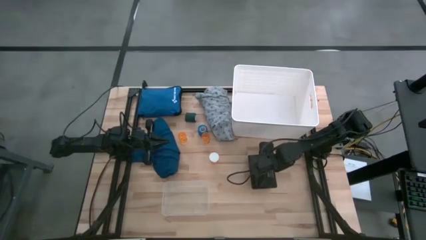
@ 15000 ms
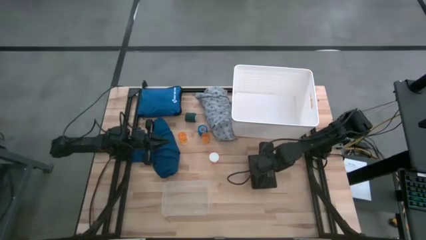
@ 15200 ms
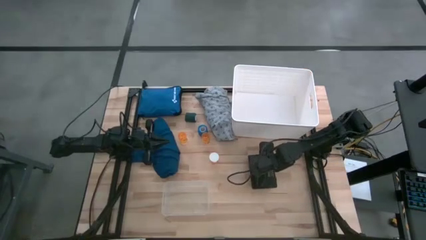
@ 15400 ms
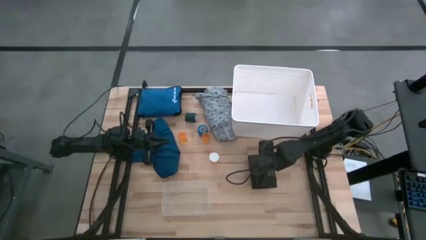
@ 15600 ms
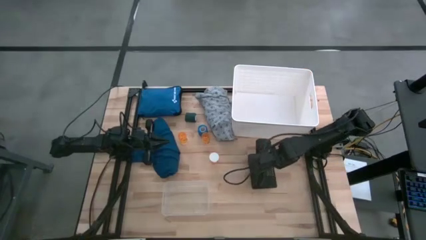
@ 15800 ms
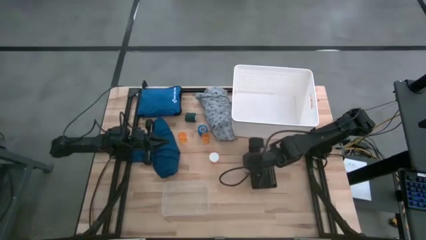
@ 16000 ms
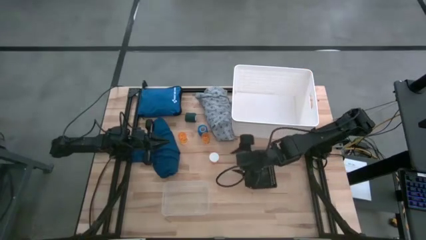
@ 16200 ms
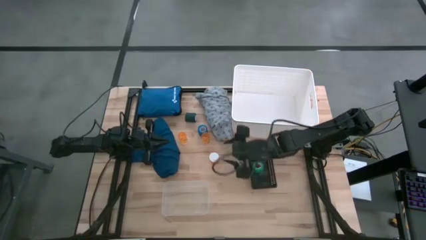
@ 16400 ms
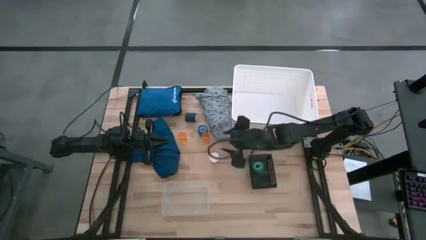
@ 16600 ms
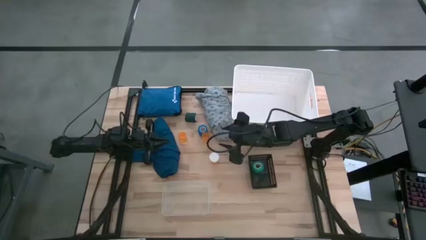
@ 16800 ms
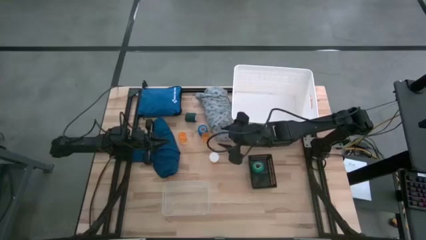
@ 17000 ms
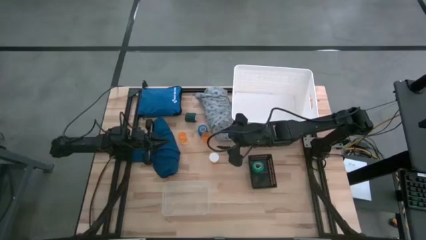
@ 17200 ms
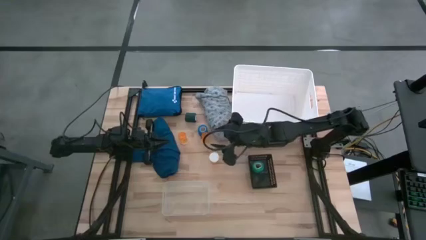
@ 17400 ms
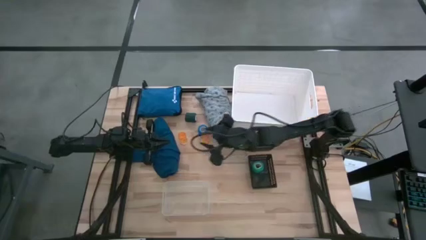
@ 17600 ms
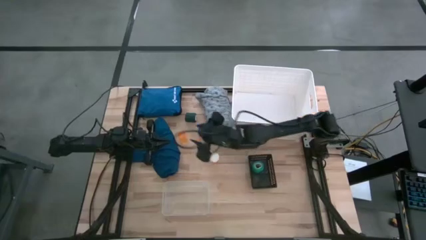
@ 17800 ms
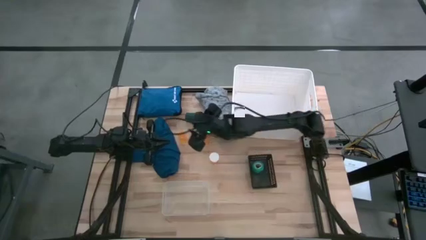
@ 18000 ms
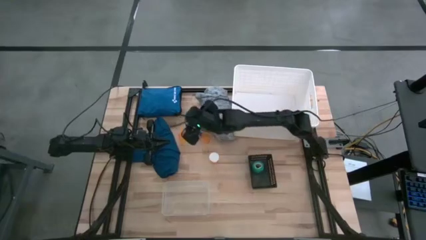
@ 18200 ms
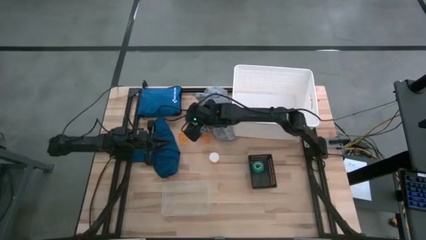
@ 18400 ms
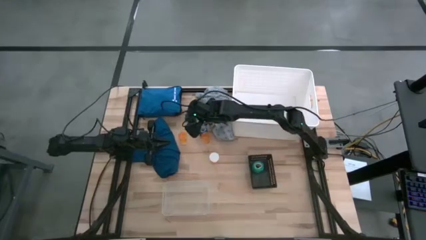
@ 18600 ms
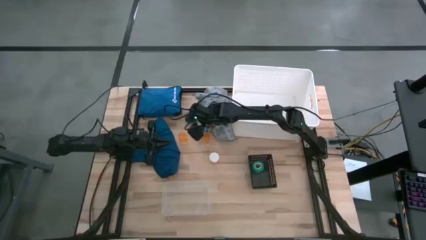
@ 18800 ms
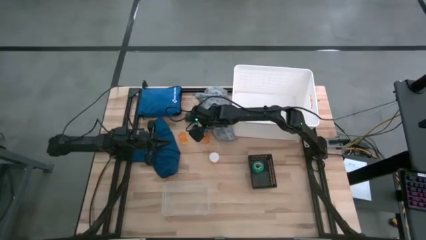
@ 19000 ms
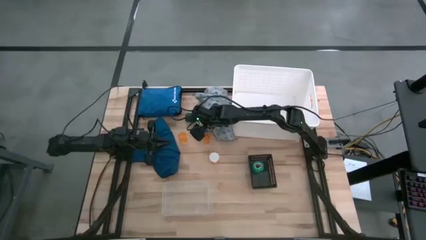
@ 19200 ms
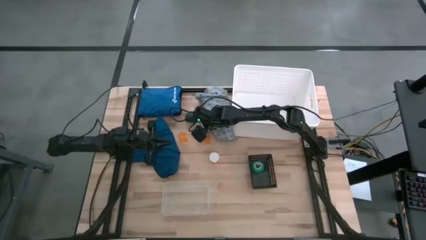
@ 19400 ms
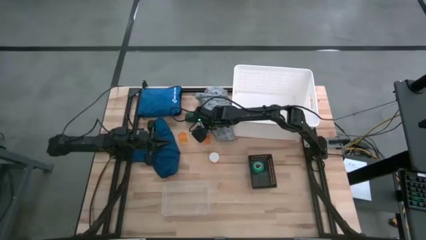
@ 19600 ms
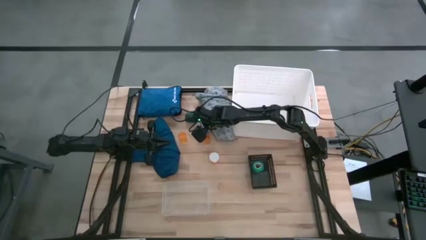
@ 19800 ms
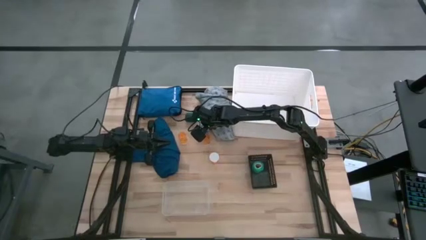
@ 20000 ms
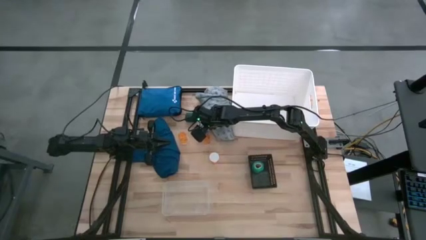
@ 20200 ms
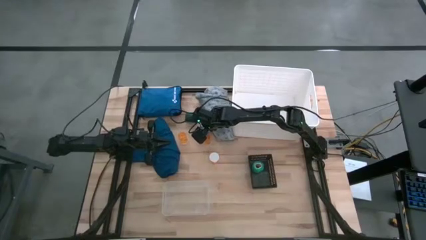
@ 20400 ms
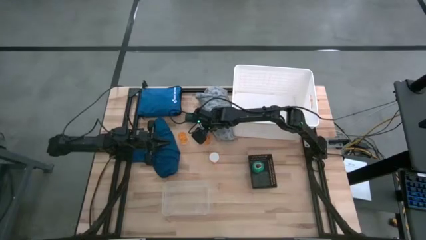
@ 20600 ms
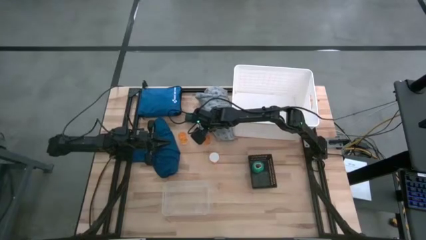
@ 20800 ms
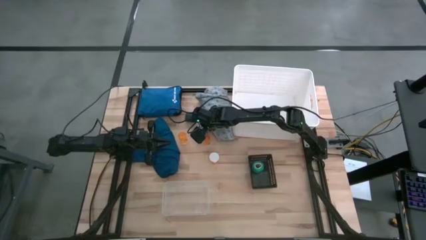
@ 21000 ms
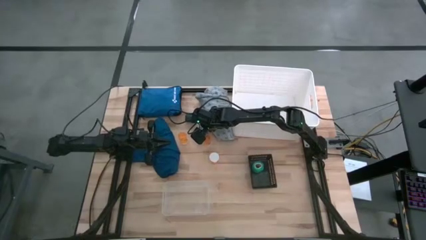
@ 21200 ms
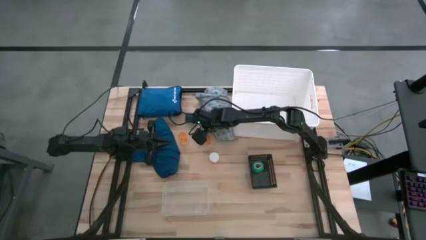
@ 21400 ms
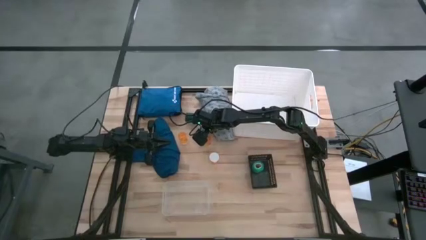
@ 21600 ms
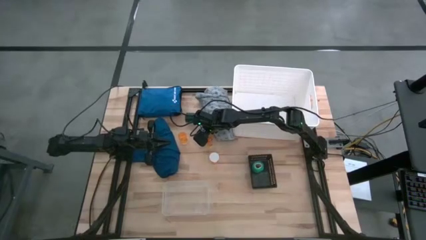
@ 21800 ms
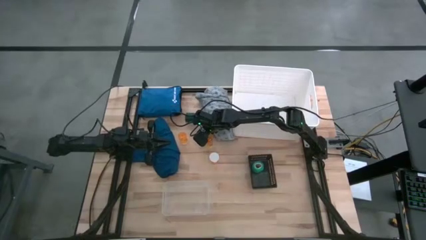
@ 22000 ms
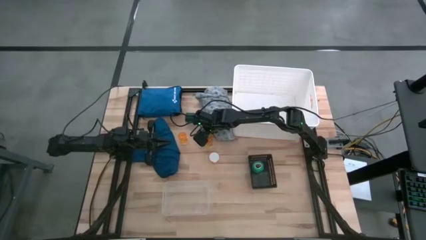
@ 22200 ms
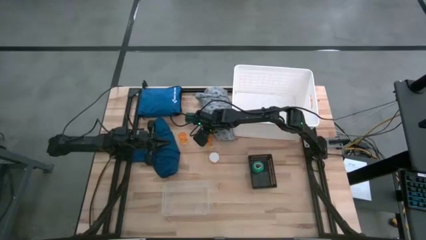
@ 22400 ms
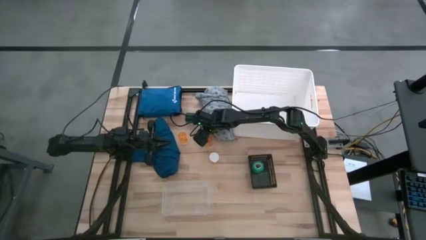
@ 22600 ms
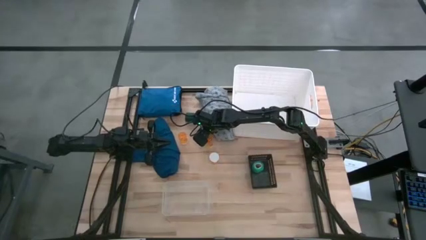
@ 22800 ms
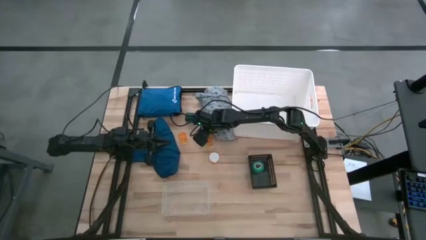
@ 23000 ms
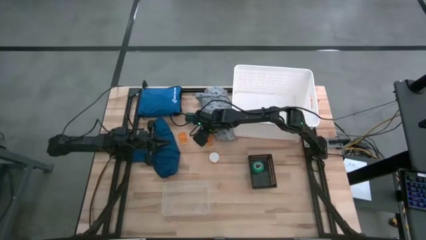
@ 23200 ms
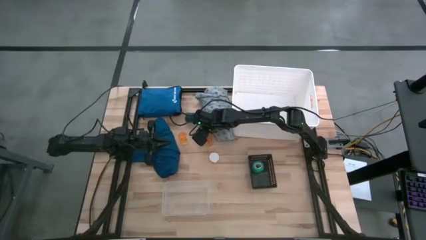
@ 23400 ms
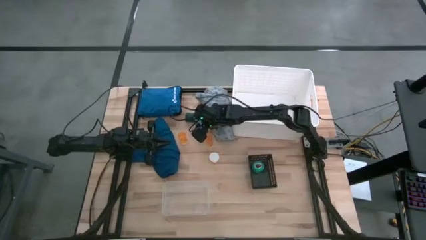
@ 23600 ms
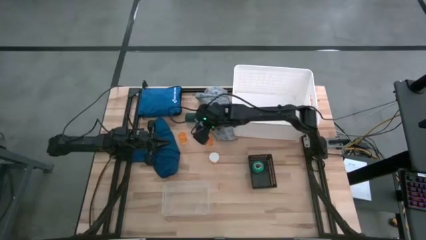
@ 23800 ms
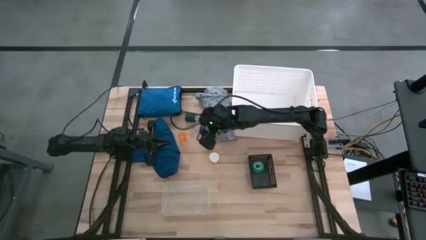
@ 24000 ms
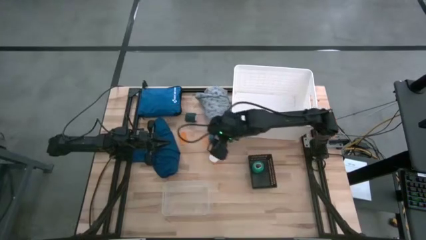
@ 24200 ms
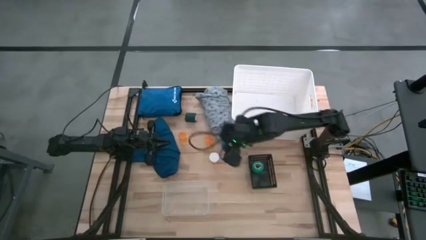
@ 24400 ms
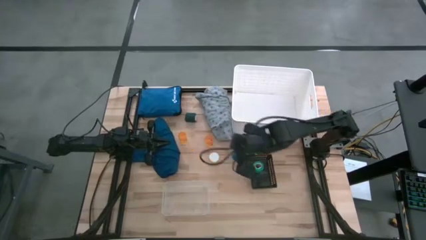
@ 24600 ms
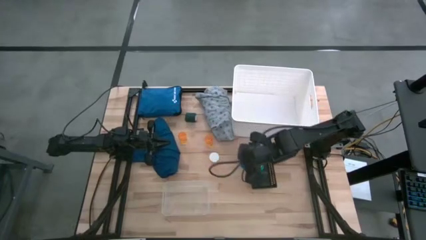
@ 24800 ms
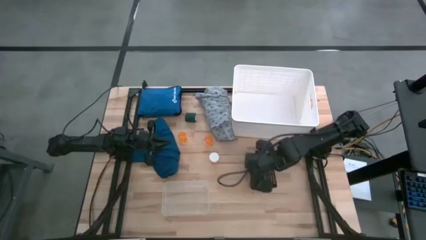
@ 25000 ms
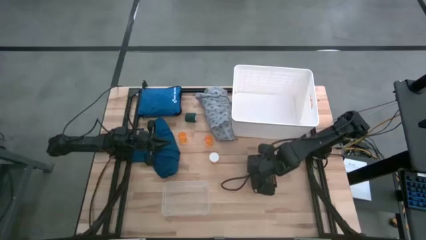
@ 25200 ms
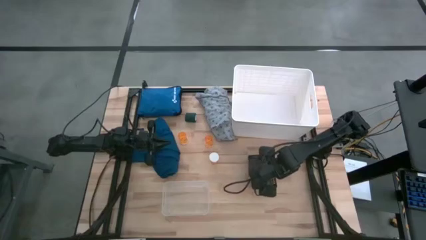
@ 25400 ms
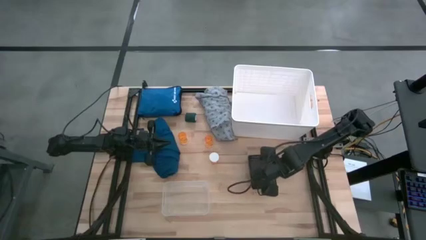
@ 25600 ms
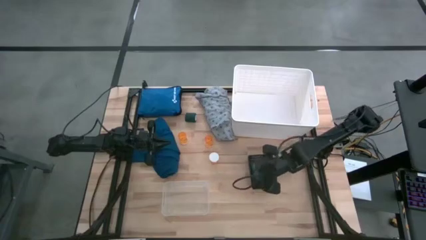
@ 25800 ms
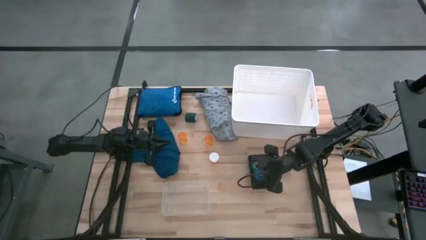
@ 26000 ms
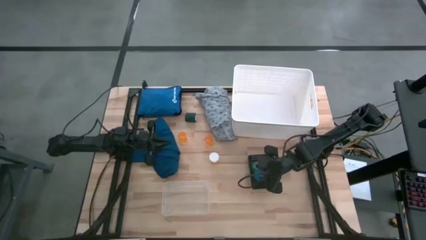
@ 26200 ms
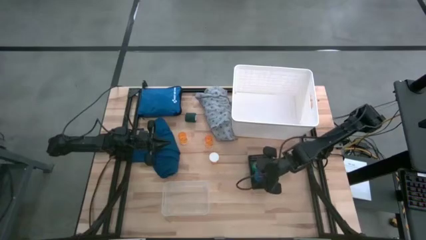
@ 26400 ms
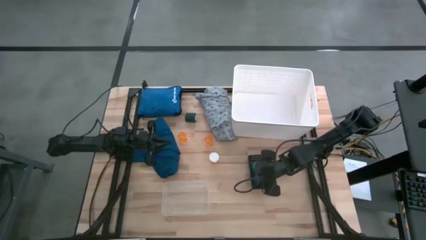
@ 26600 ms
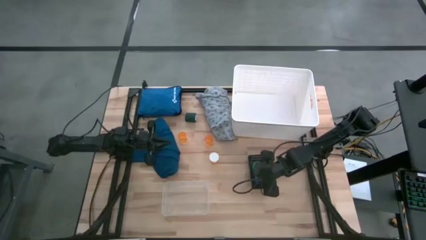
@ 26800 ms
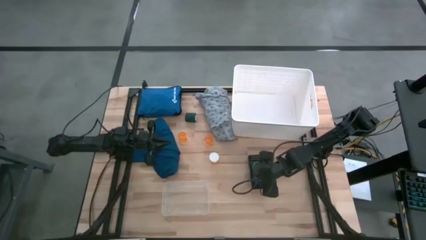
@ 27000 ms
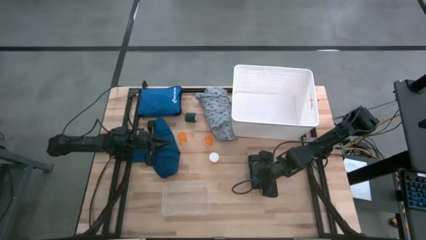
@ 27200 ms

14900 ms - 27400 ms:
Task: Pick & place medical supplies in basket/bin
Put the blue bandage into the black bin
